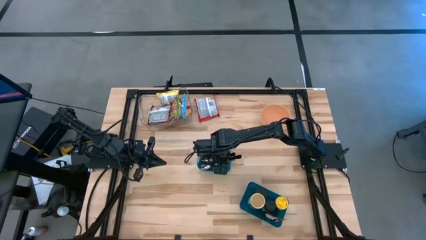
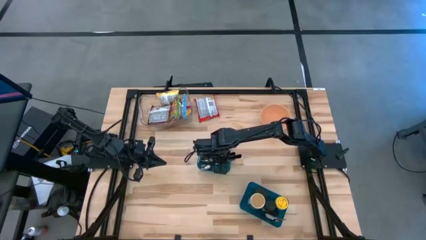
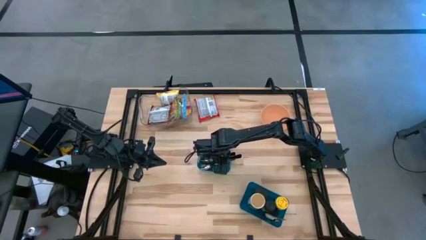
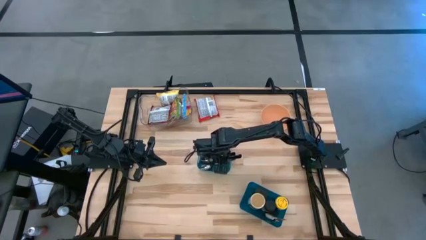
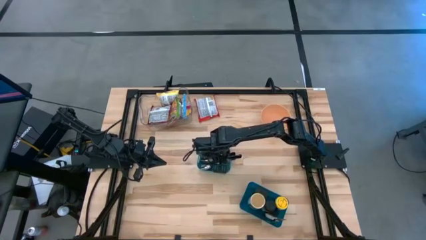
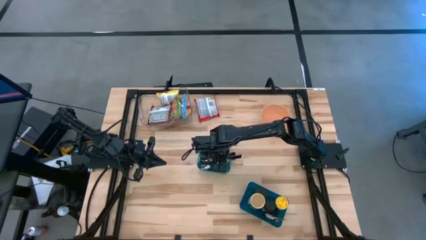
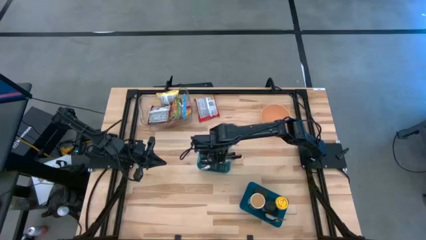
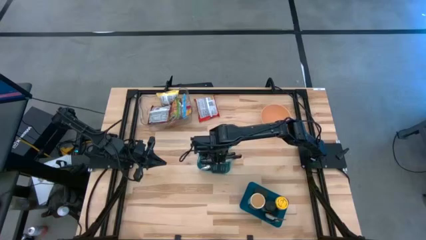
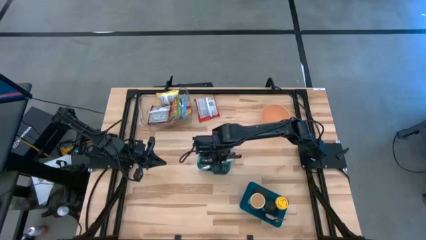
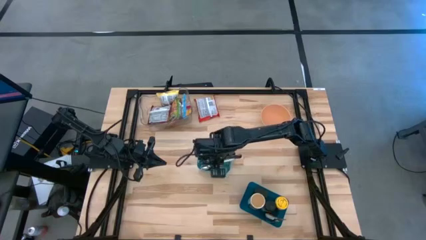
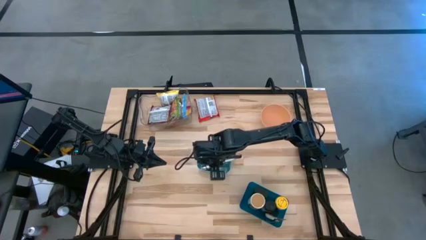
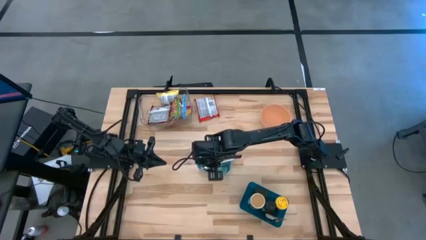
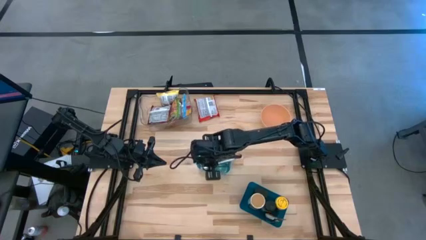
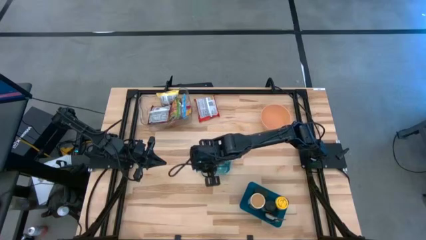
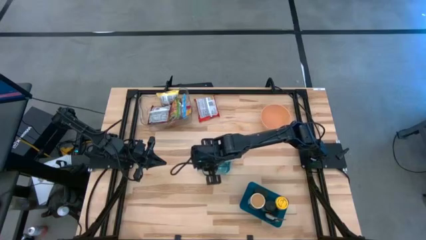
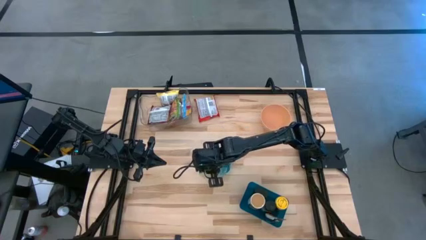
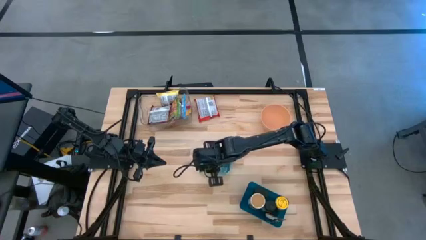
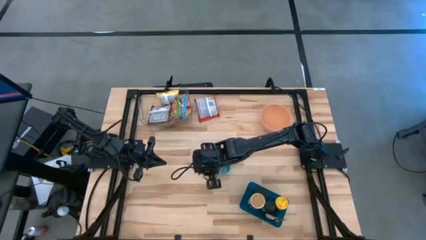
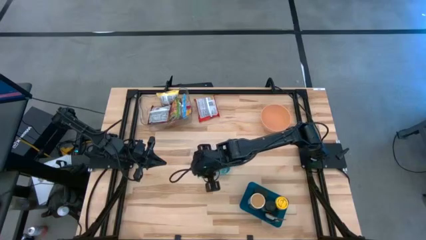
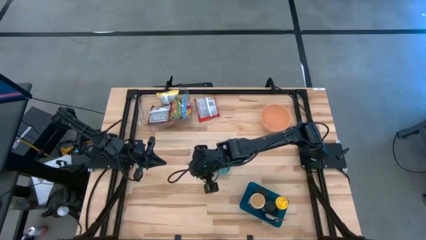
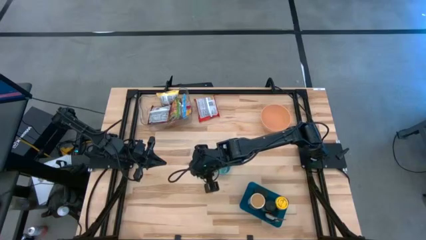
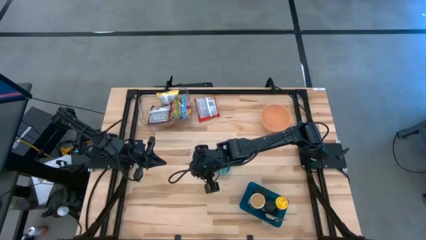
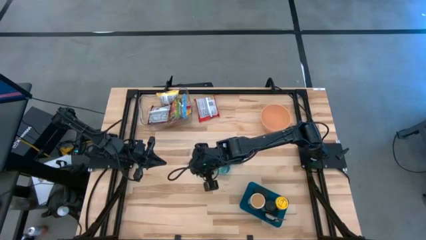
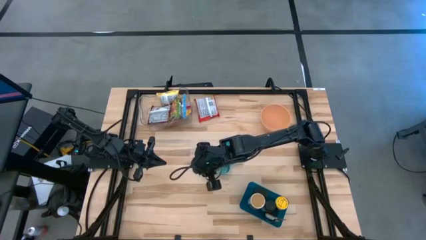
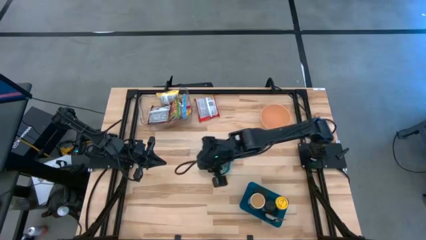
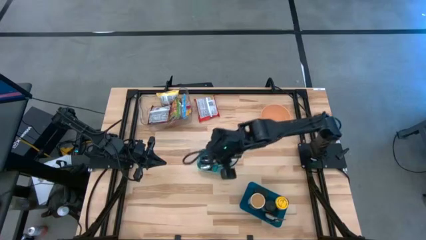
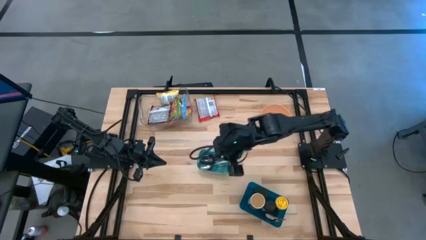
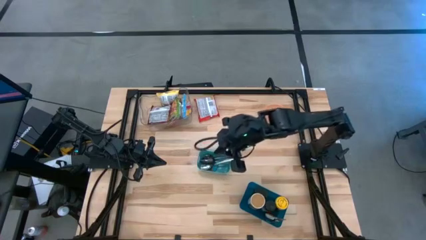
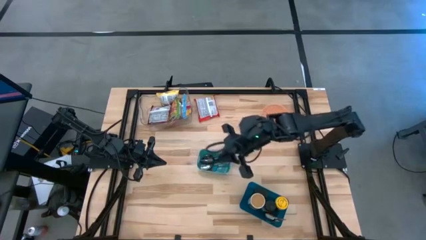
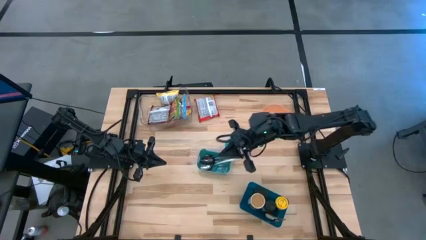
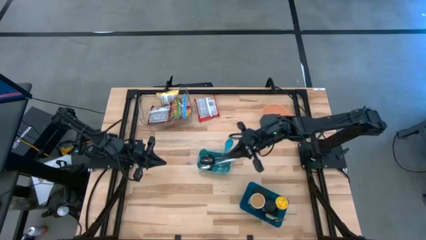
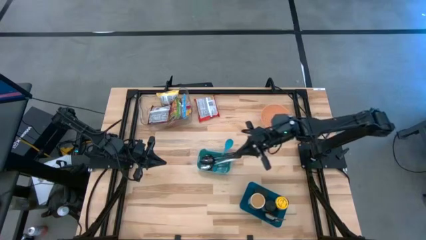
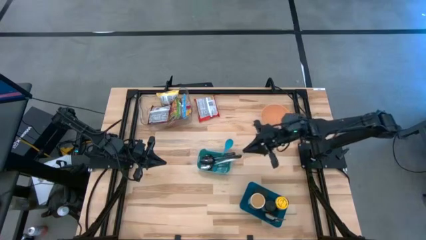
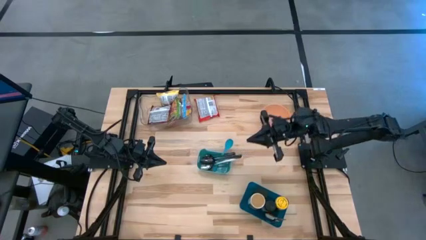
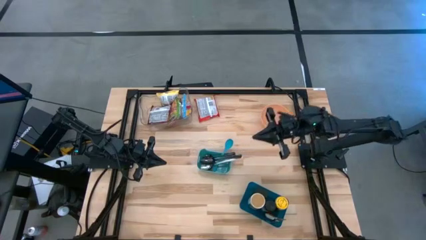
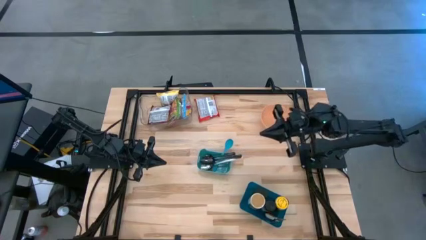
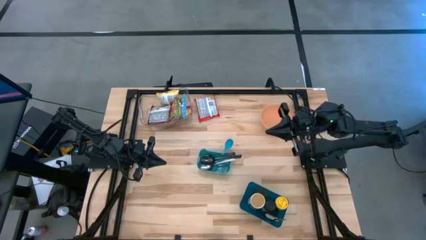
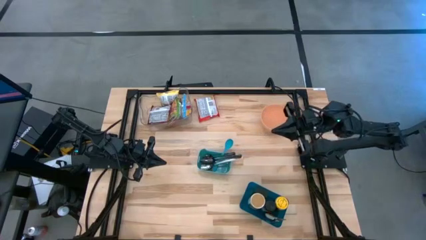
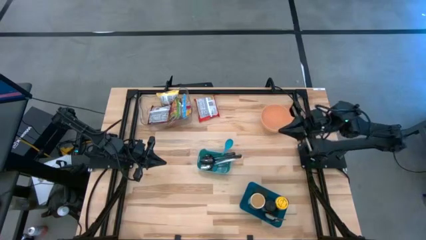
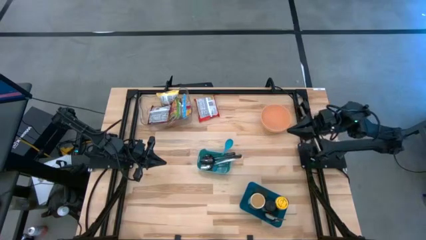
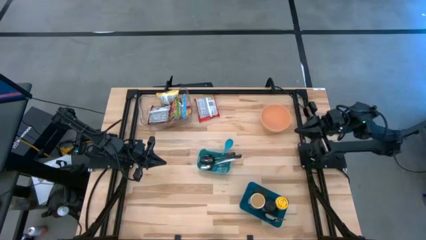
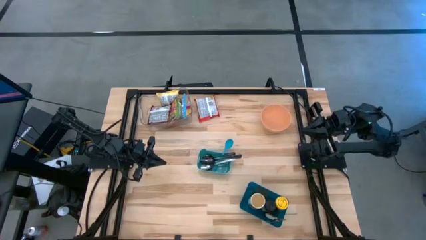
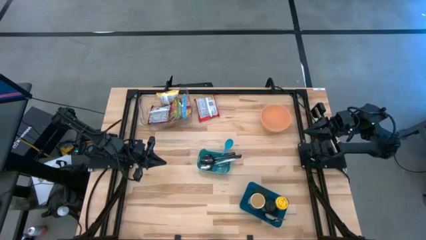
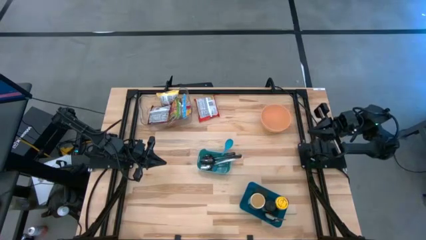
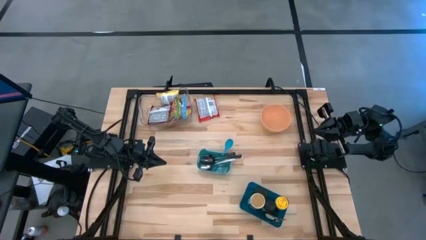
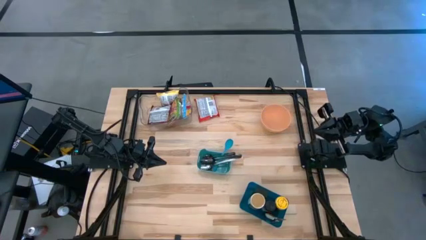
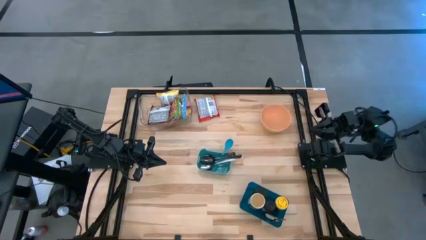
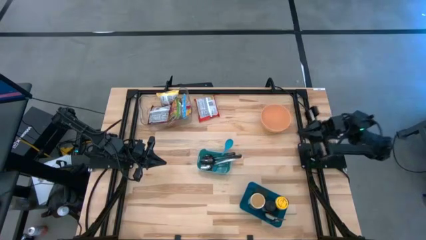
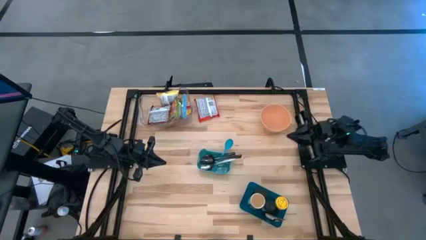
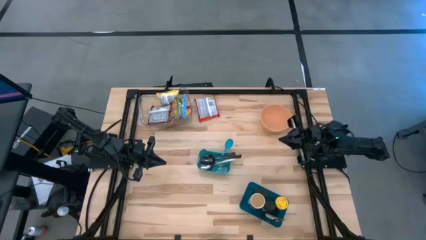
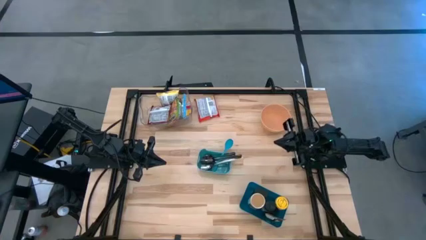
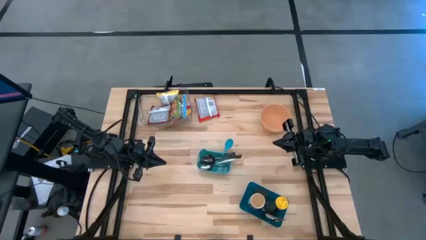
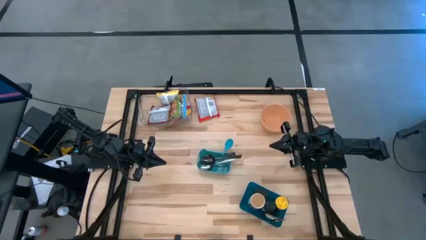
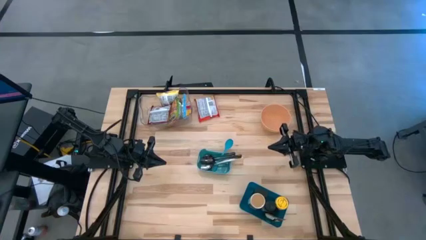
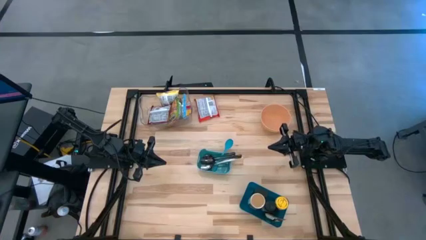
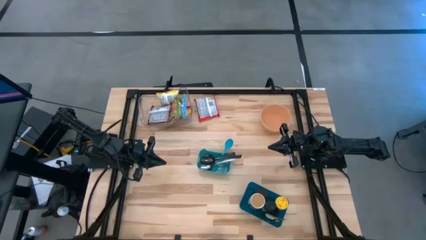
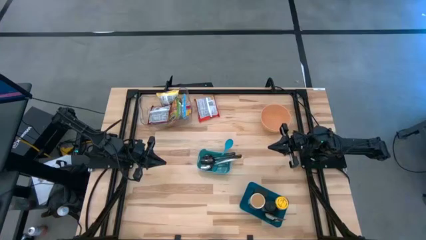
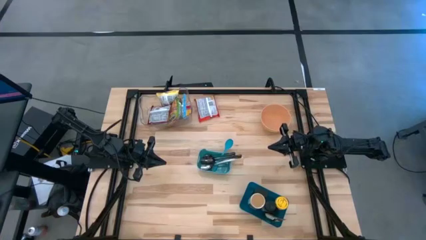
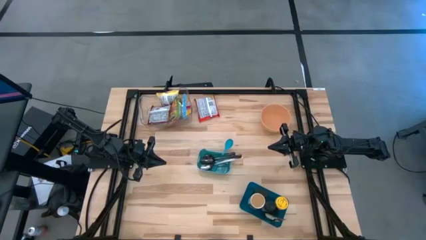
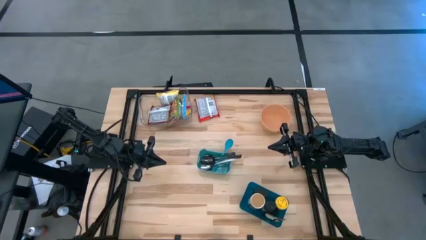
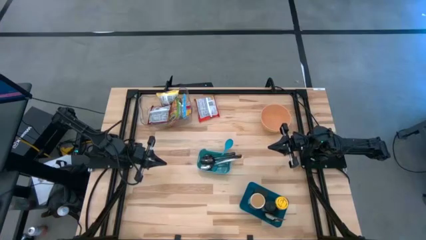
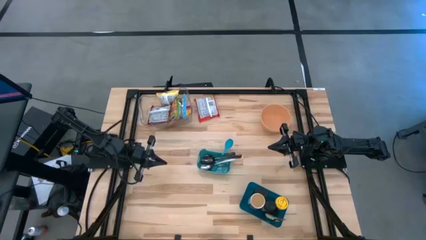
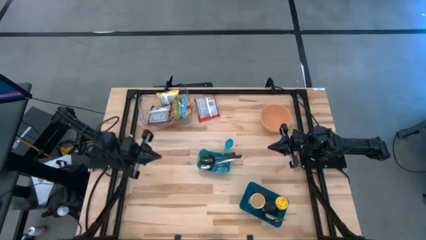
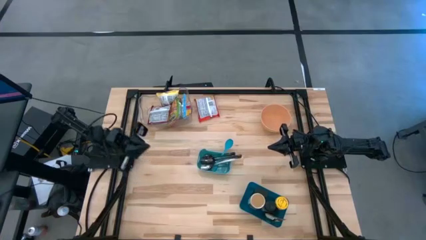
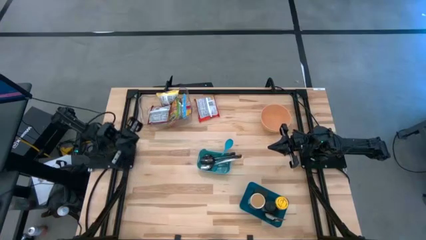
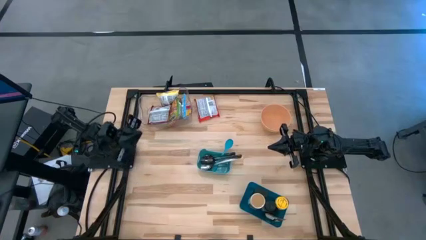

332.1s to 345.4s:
Task: Pick & Place Food Item
Put the red noodle pack into the transparent bin
